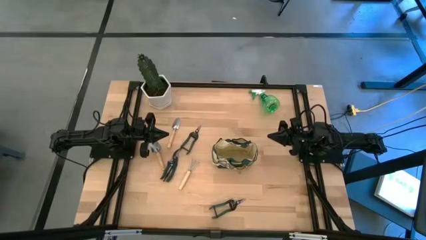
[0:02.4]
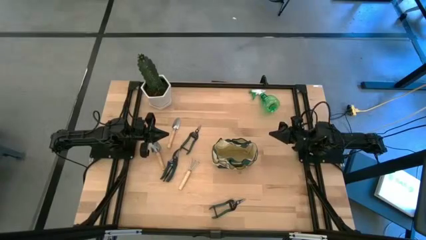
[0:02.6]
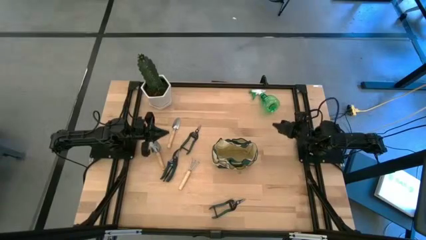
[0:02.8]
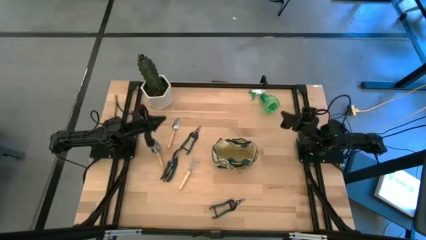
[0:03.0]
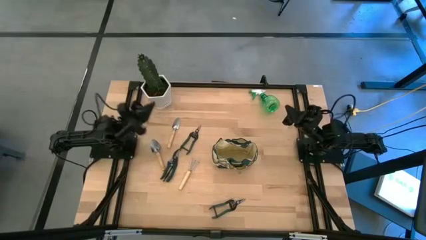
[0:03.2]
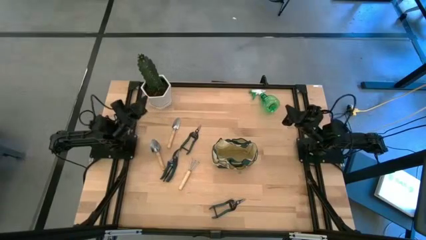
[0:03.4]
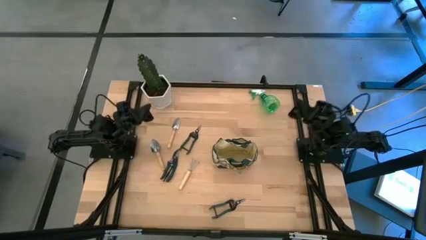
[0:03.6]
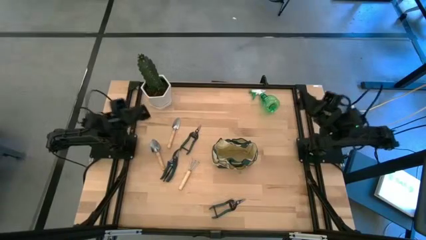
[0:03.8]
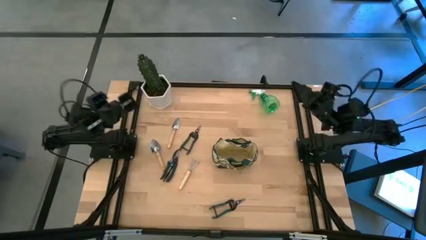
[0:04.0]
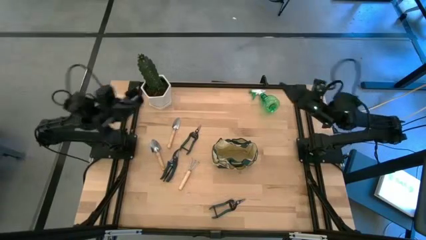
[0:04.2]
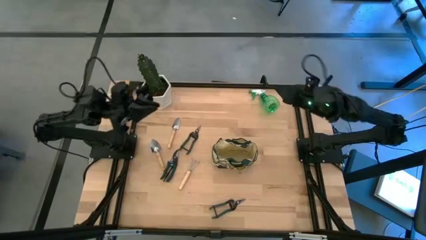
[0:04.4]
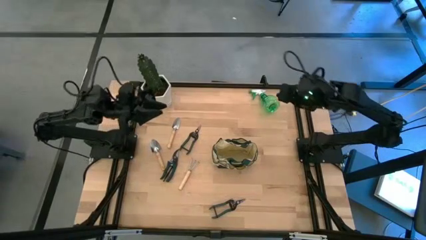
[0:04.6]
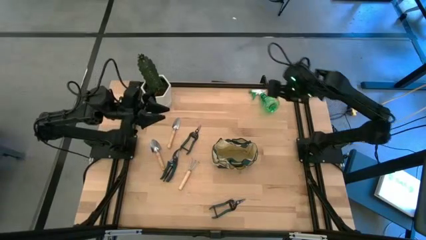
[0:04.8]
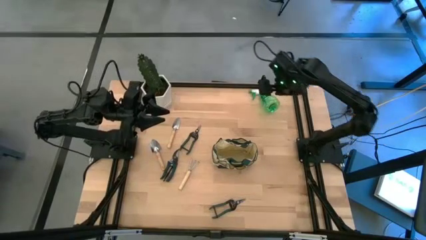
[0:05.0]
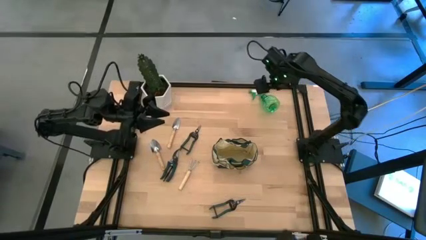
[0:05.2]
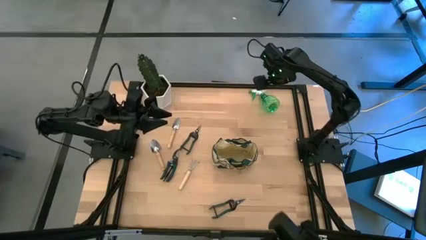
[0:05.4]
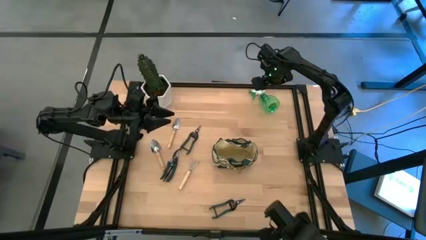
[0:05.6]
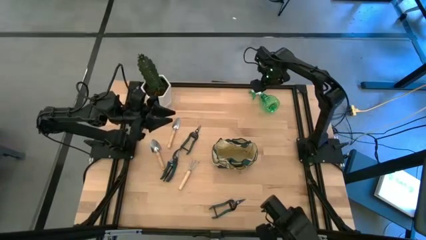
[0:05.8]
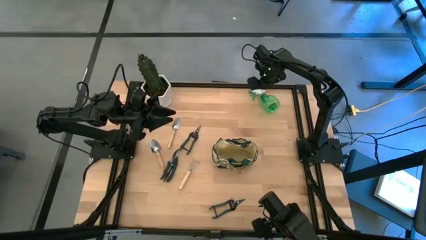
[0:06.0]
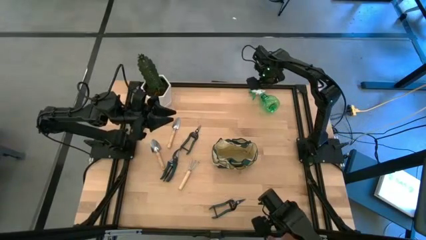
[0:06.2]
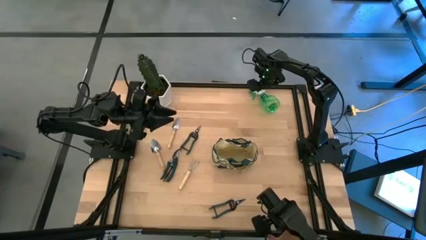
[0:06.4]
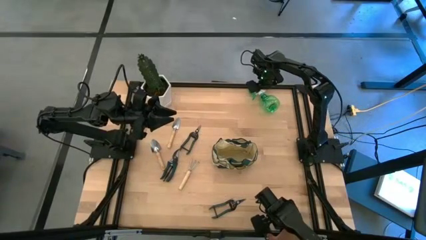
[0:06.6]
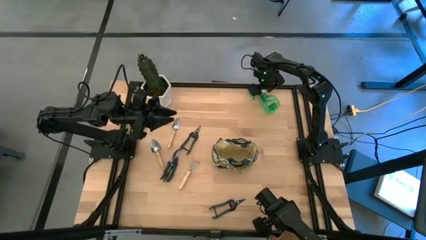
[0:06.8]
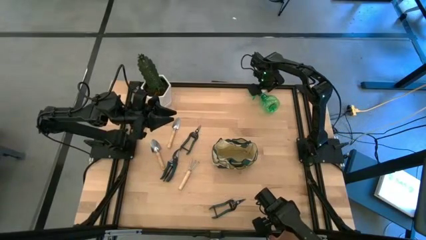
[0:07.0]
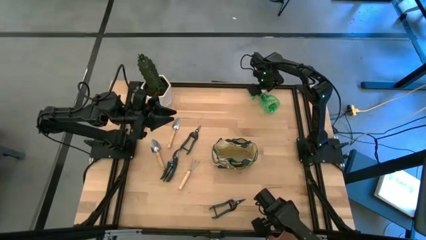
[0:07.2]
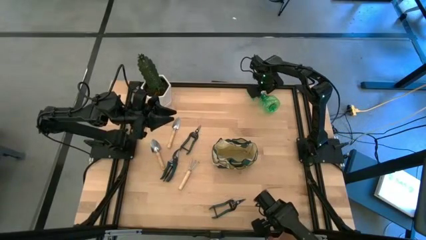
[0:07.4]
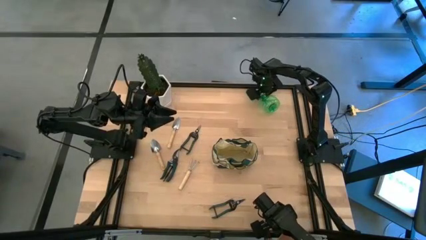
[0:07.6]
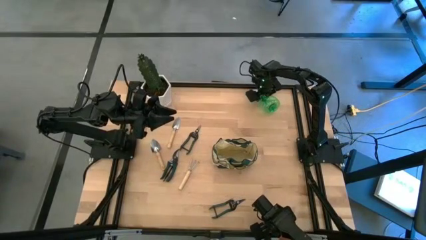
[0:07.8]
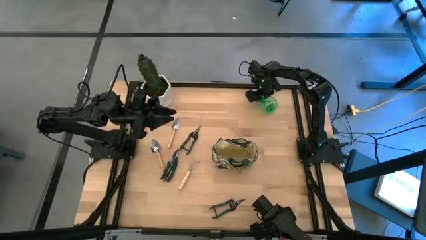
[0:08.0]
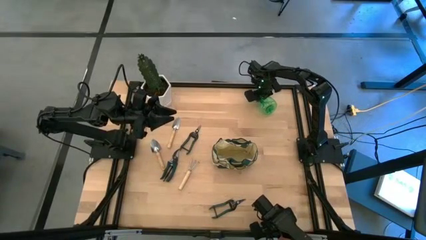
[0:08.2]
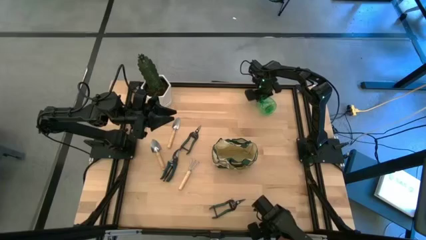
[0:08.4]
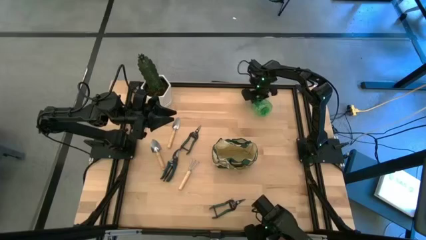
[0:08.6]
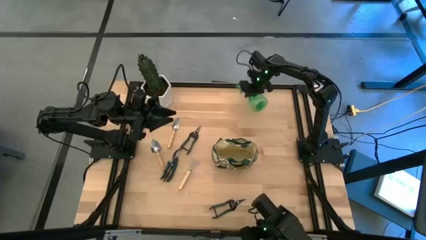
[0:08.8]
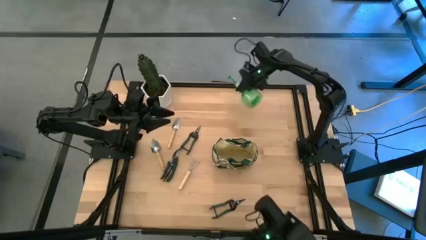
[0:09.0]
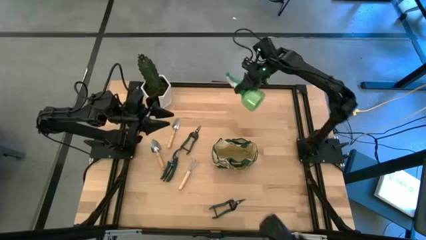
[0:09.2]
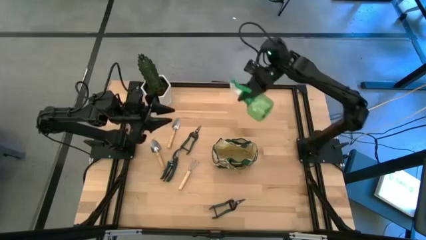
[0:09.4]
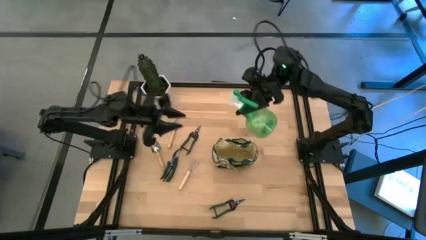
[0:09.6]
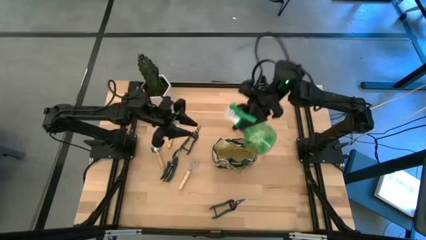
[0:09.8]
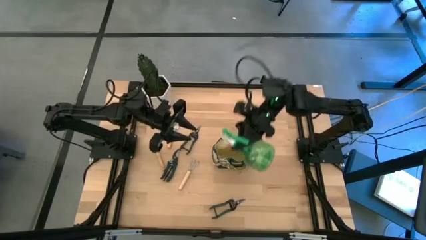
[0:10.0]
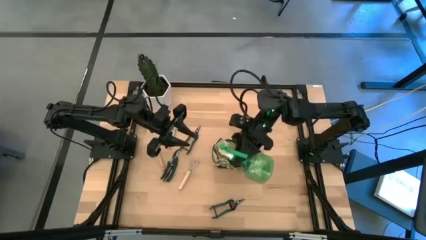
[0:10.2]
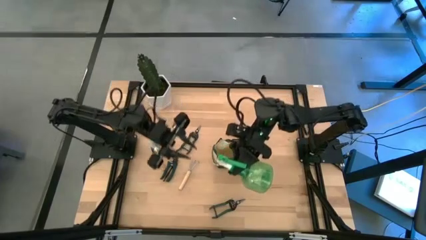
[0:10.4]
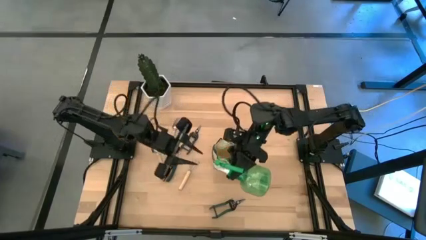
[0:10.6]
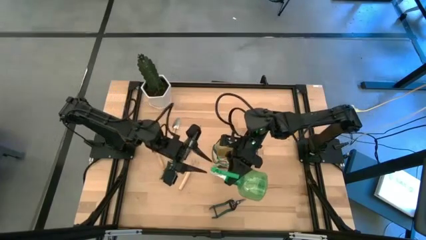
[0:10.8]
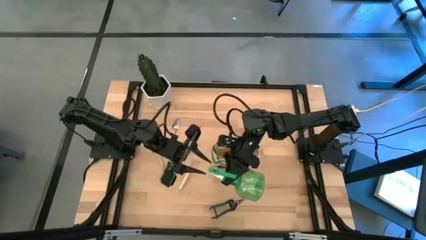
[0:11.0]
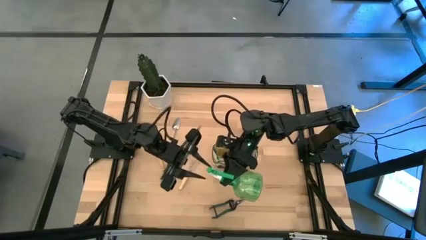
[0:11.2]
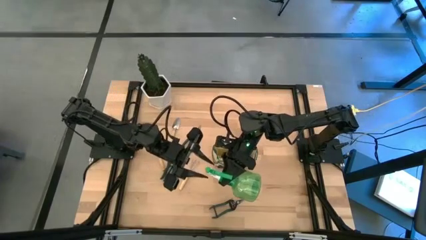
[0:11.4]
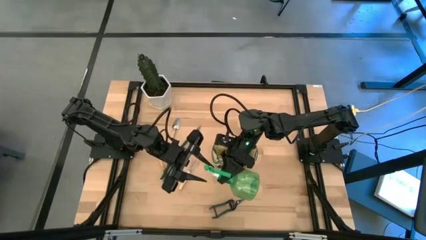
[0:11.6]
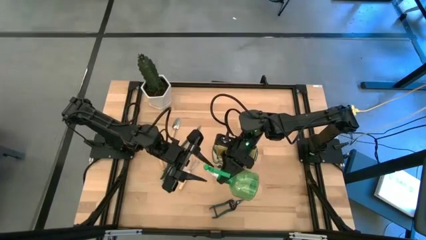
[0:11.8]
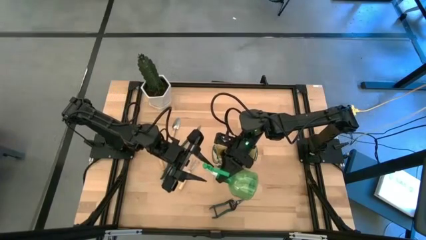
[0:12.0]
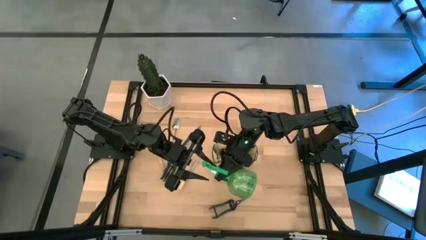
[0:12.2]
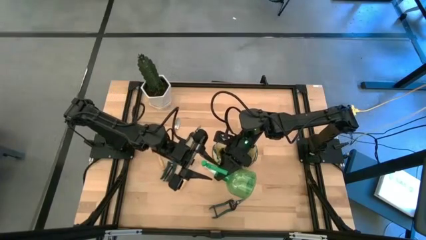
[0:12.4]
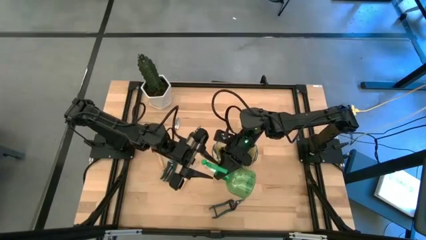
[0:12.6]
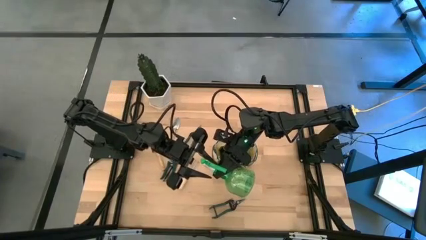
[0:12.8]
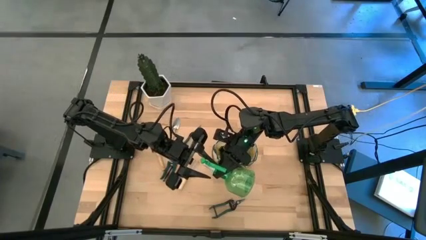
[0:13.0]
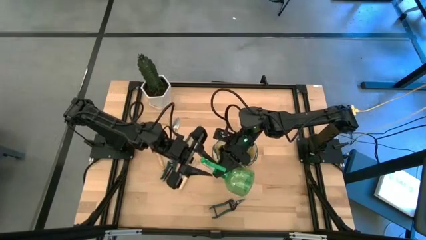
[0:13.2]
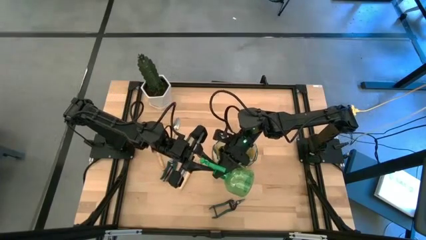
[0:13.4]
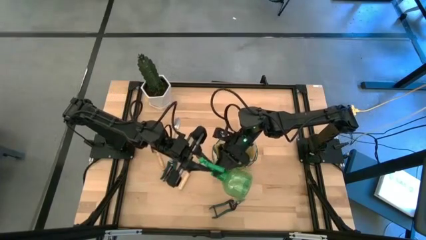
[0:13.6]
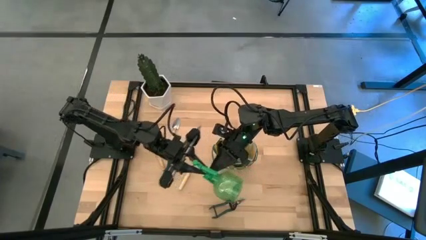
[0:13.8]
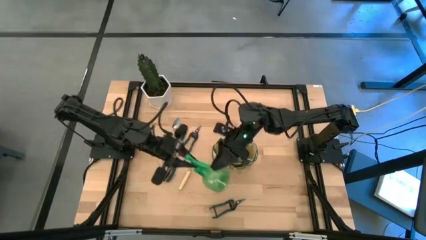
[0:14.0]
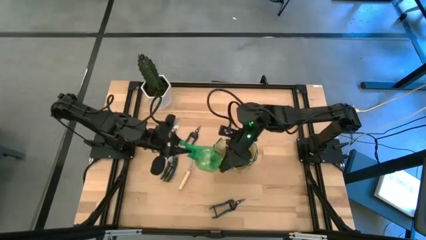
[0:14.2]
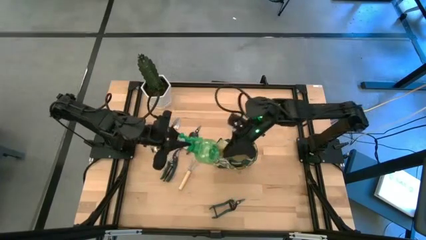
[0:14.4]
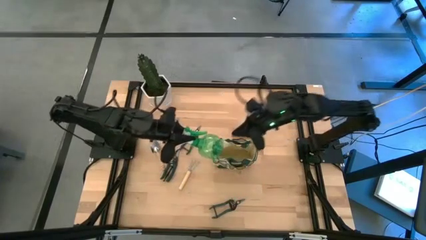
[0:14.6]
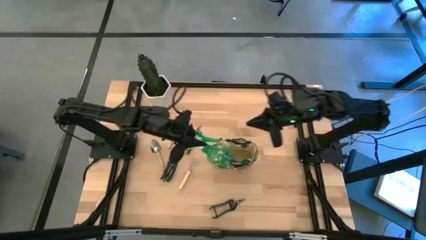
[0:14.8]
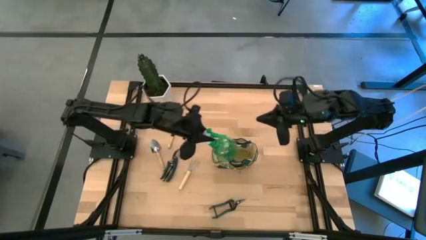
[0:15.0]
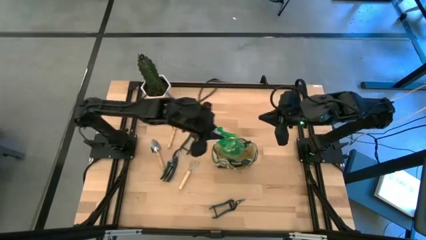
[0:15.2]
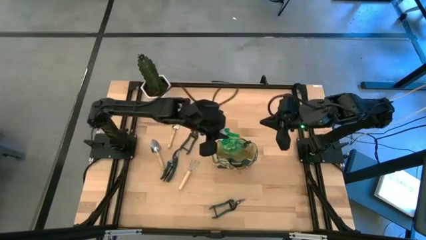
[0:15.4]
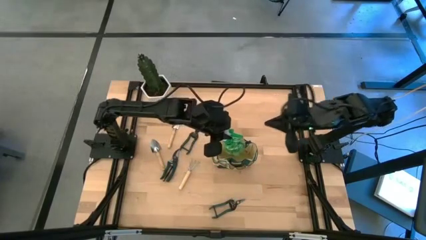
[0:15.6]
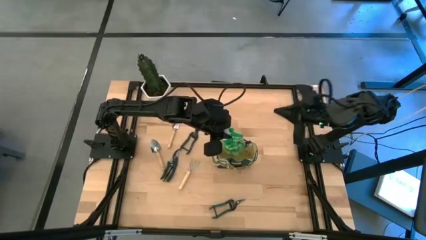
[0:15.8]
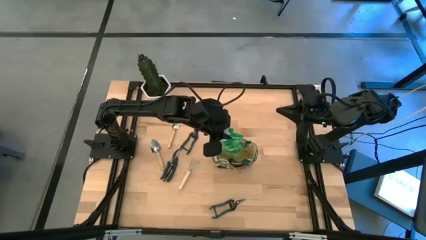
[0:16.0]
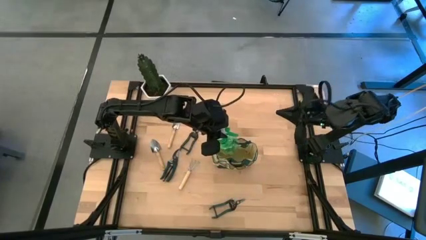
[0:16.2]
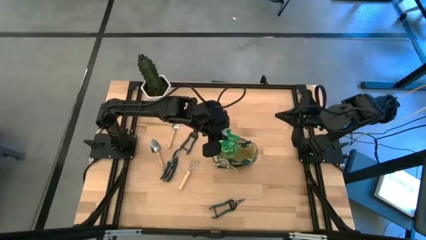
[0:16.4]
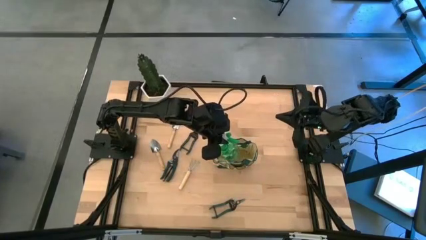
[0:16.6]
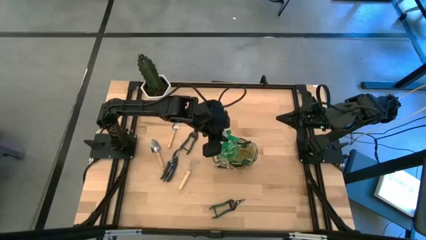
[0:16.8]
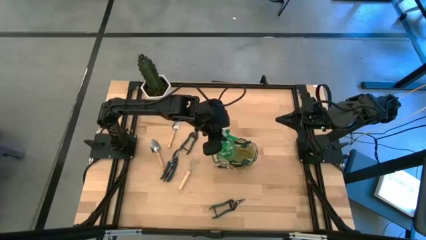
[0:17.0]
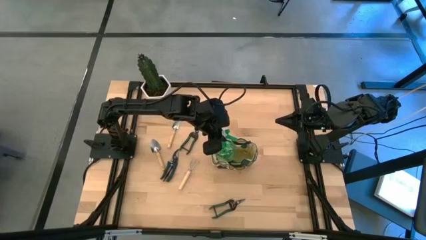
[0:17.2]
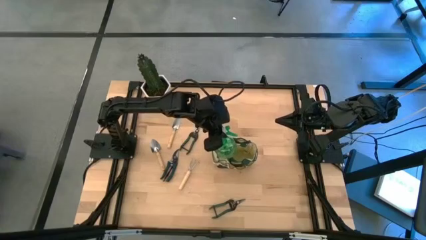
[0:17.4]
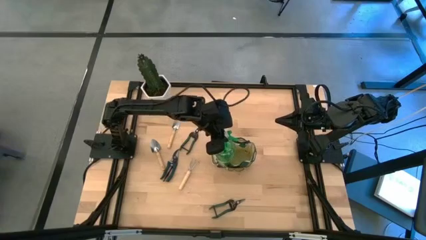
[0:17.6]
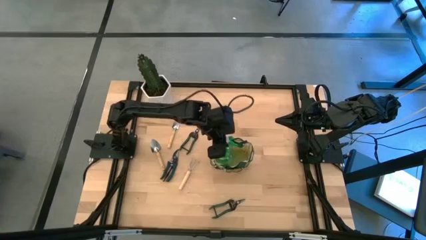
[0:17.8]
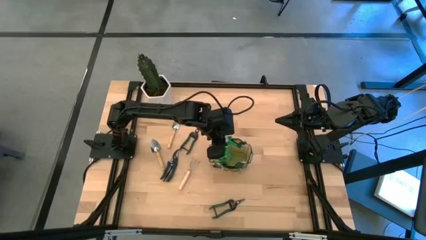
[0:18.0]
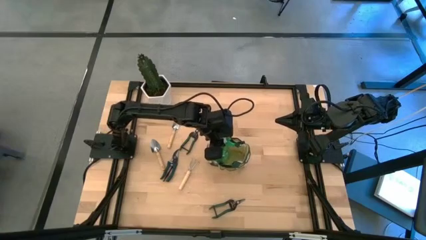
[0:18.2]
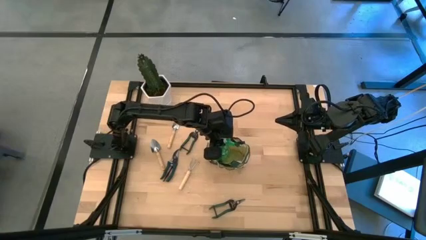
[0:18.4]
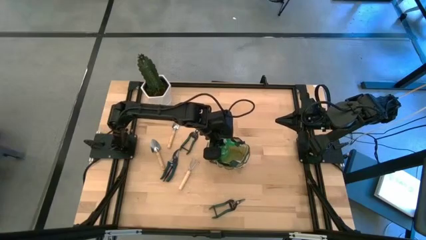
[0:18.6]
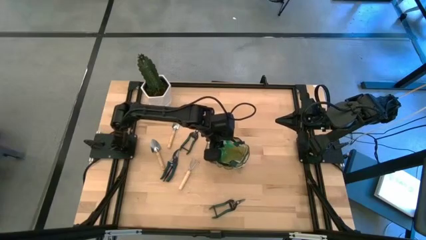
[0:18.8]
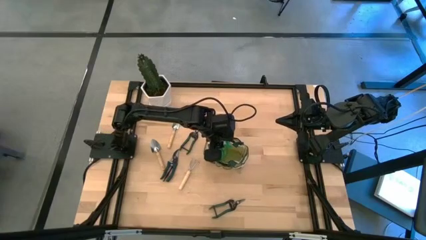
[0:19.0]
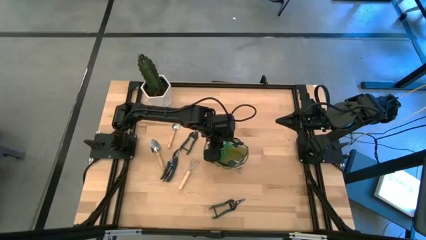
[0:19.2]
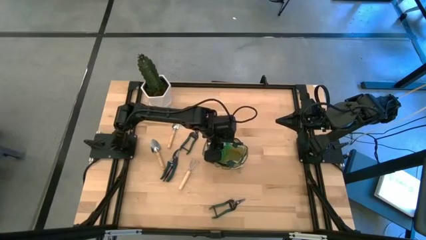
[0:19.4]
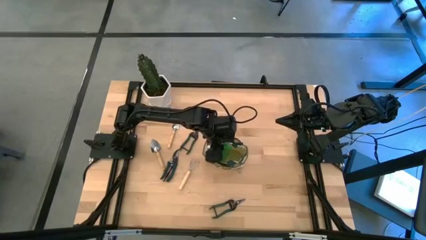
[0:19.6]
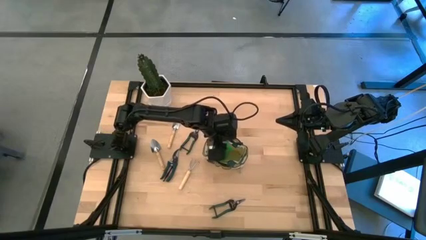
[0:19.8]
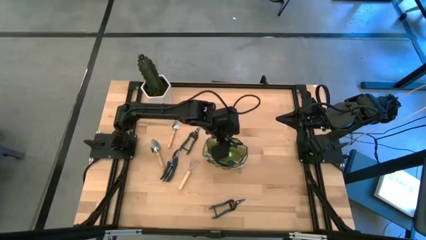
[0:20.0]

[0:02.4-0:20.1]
Task: Pick & Place Garden tools in Gardening bag
Put the gardening spray into the gardening bag
